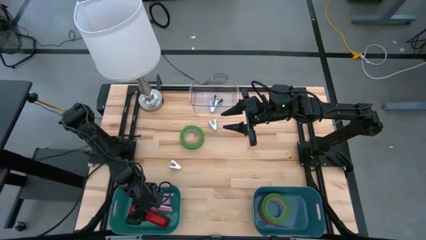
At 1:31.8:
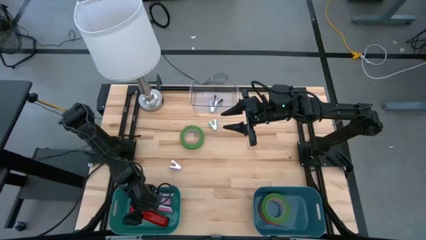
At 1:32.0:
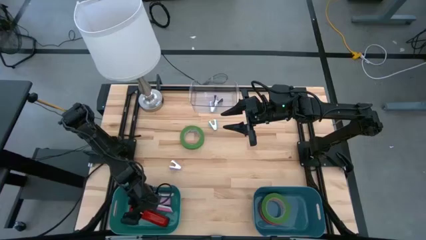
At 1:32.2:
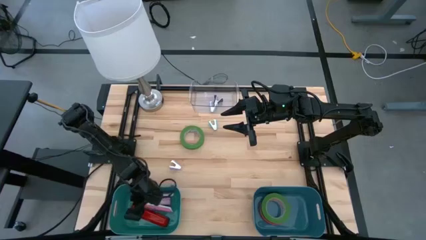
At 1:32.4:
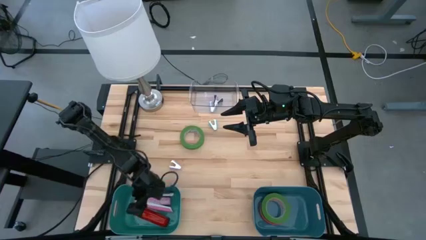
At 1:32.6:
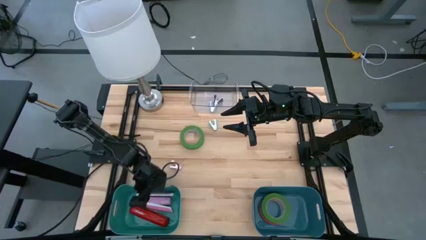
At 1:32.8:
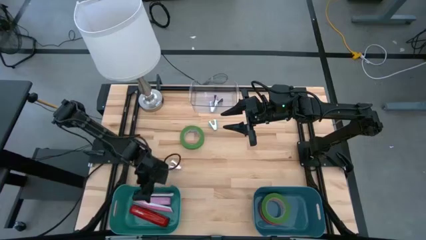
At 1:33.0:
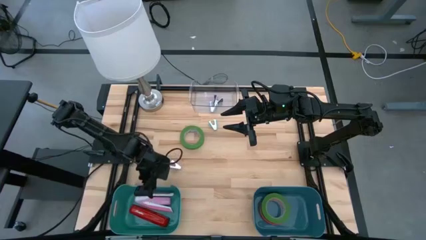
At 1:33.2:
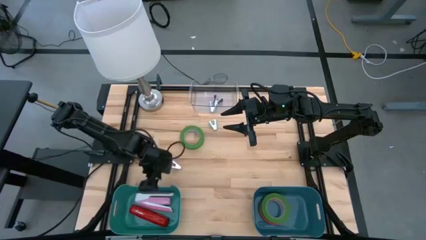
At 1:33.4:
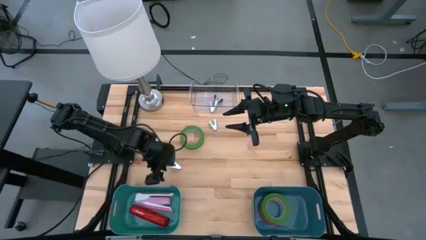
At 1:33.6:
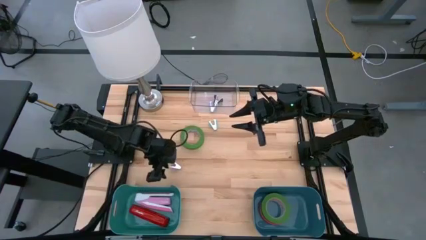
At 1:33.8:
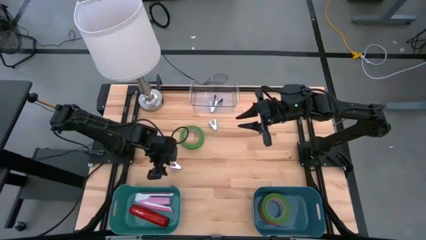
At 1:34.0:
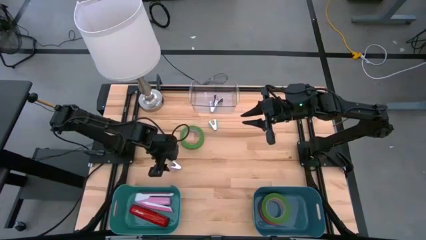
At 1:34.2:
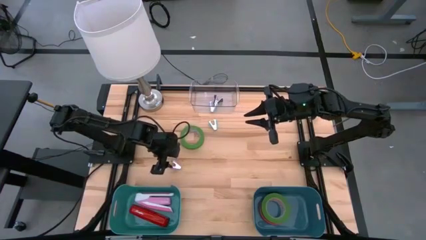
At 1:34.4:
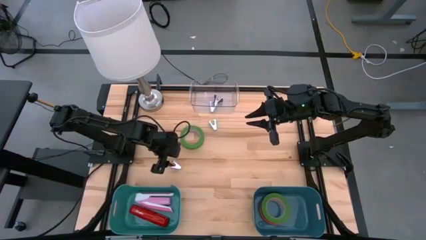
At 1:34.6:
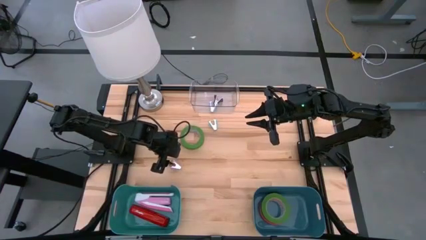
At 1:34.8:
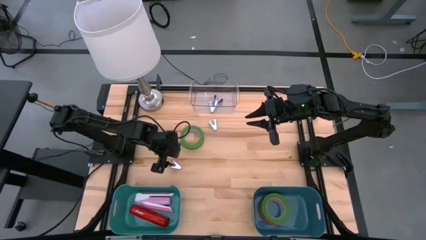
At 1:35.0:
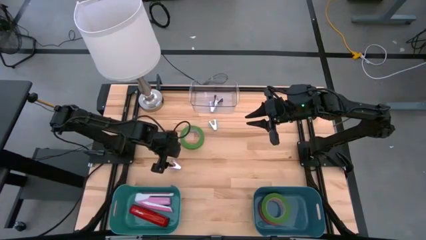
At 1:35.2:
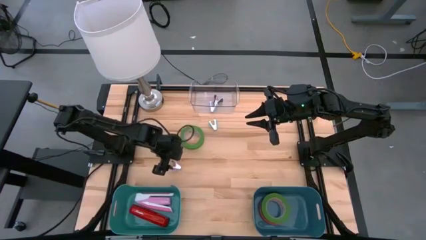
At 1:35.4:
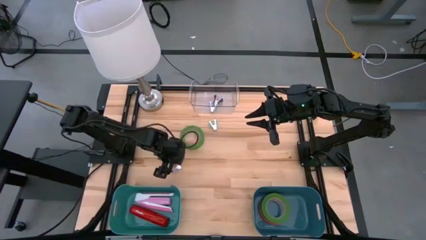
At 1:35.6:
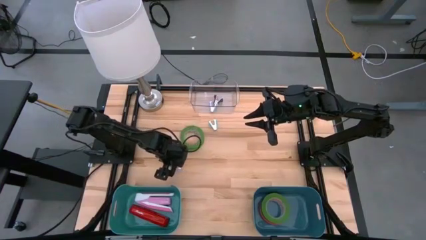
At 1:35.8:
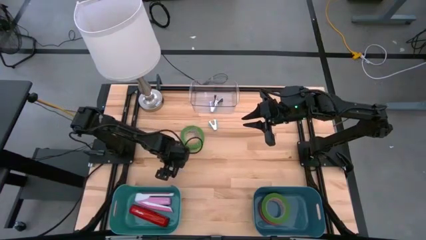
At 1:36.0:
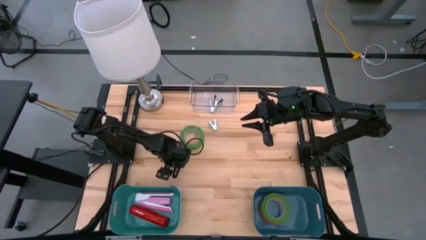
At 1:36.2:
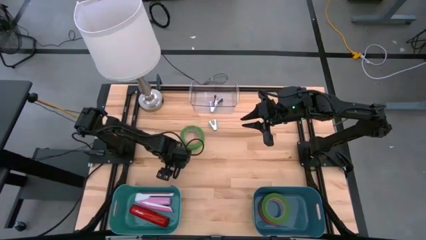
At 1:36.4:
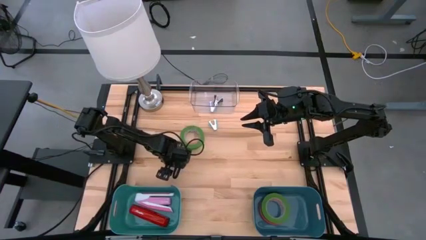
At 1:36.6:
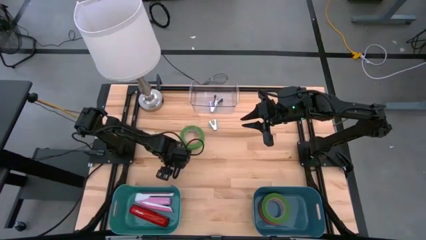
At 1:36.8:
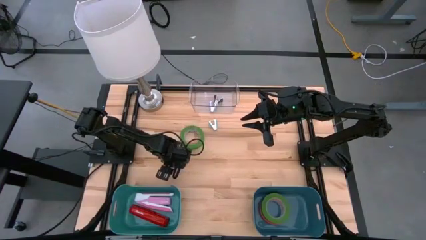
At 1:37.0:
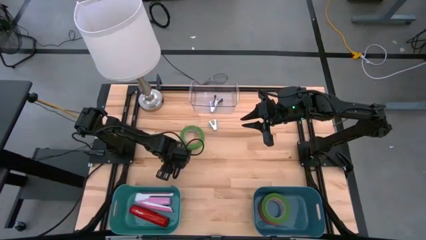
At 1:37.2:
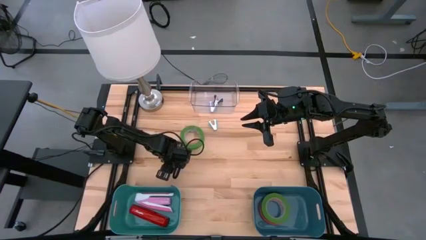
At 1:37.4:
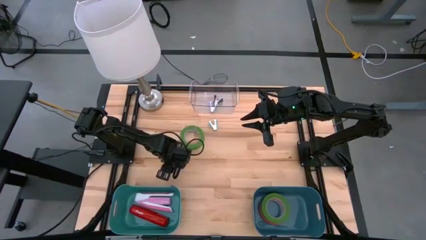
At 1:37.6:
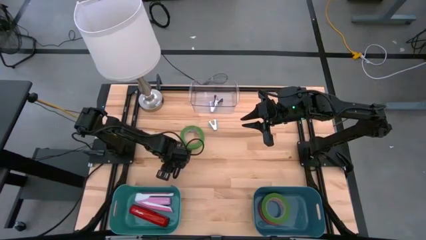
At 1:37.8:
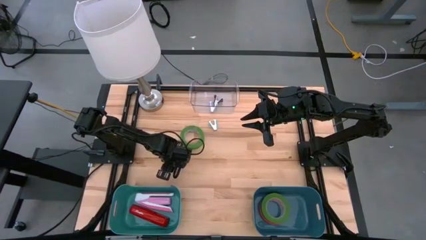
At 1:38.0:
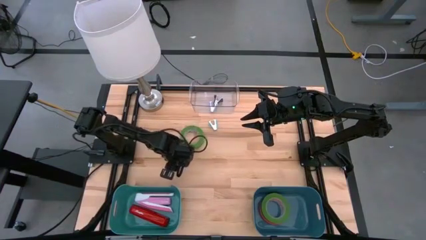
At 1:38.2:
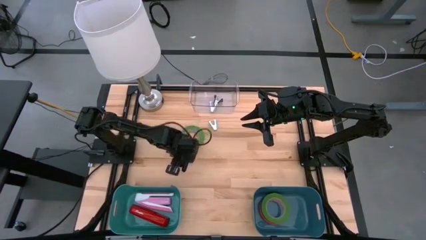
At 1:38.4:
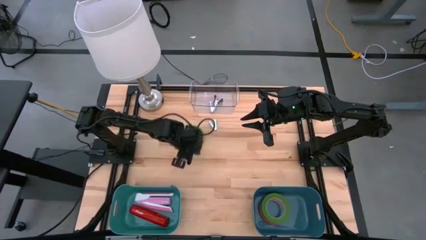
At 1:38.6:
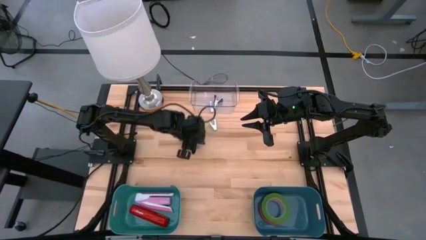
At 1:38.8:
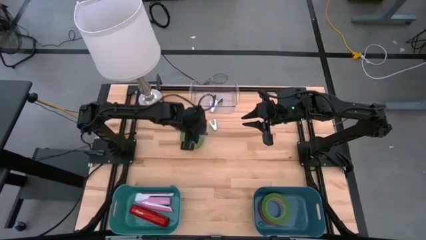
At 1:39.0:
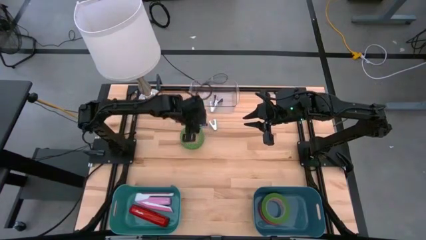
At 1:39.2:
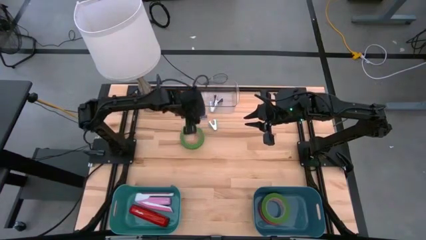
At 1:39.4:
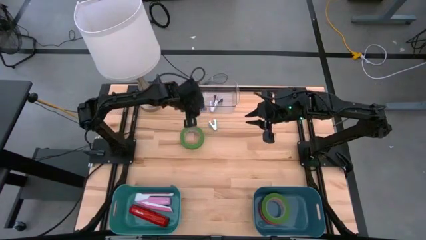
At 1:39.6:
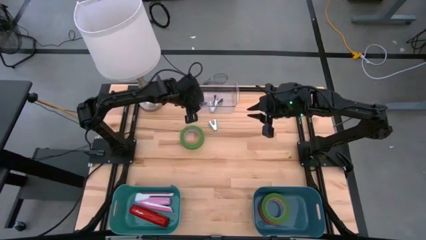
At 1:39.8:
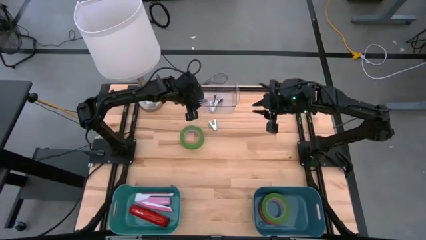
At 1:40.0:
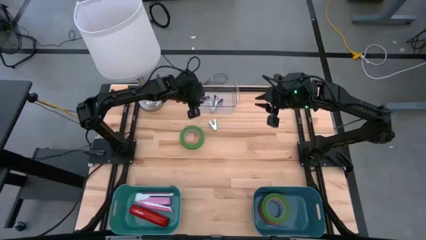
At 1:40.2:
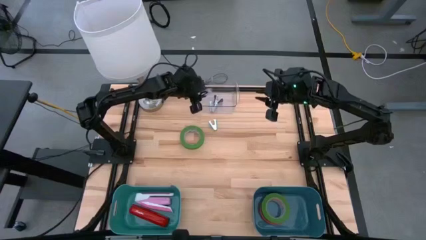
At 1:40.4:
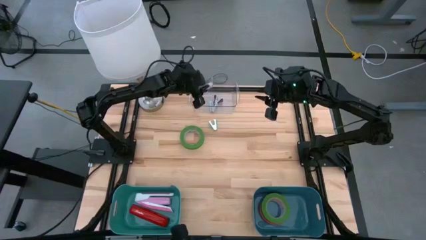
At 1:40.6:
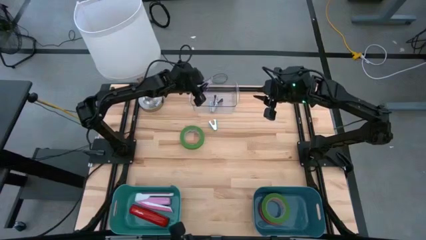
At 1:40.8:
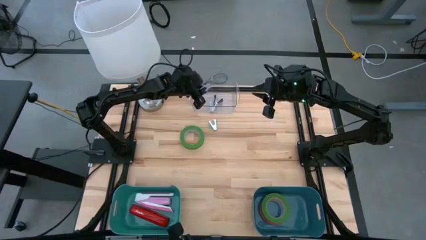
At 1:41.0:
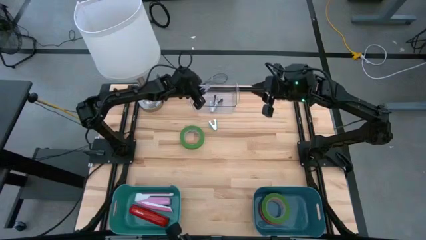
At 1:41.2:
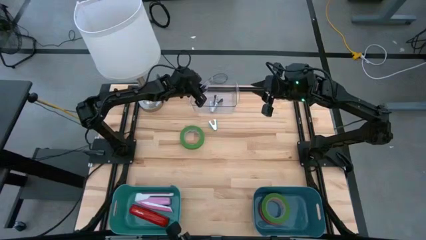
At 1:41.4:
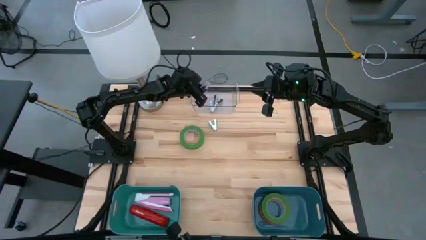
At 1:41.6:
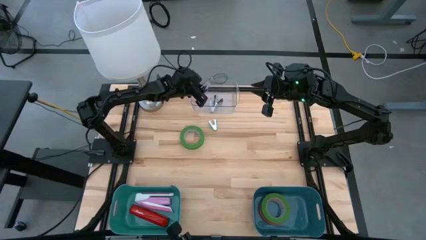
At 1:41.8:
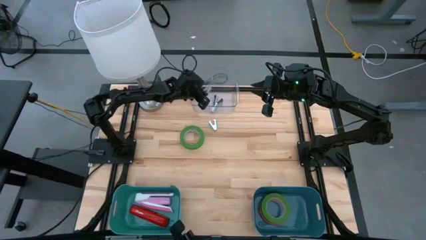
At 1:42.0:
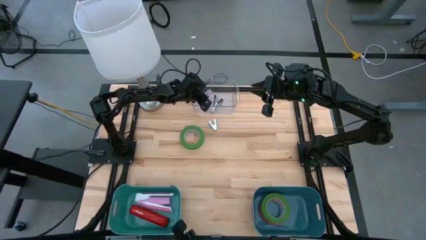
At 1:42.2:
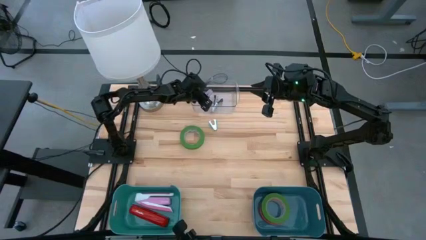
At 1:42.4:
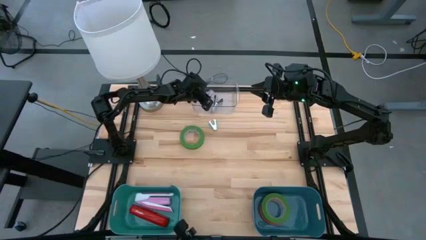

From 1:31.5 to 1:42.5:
Task: Pick and place Stapler, Stapler remover, tape
Put the purple staple remover into the transparent bin
